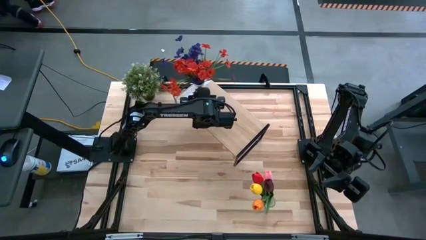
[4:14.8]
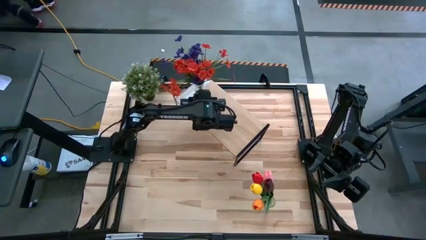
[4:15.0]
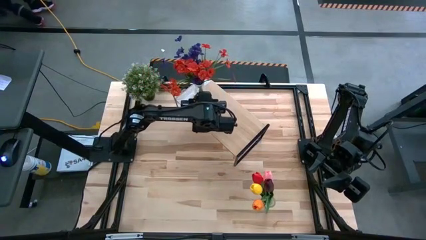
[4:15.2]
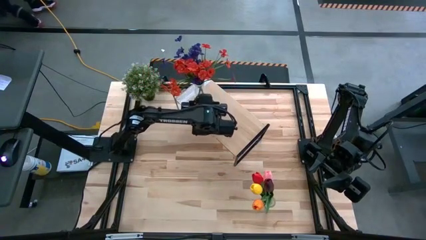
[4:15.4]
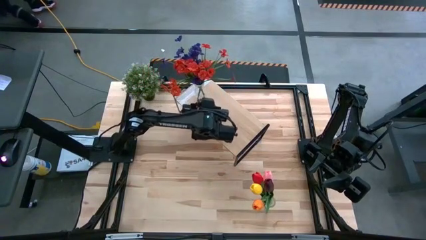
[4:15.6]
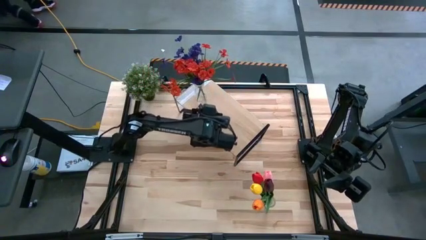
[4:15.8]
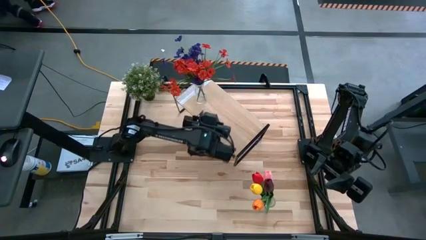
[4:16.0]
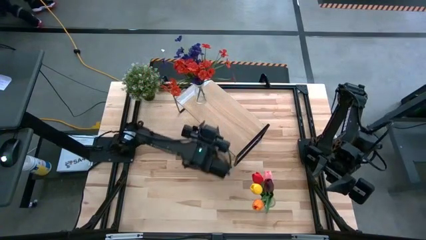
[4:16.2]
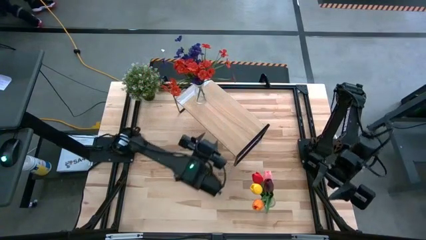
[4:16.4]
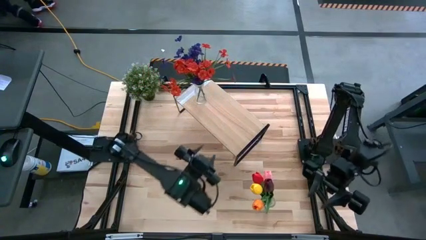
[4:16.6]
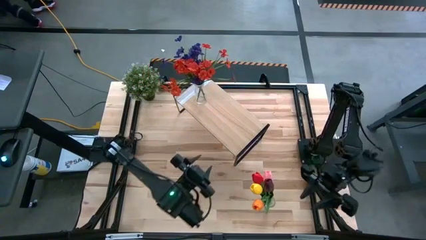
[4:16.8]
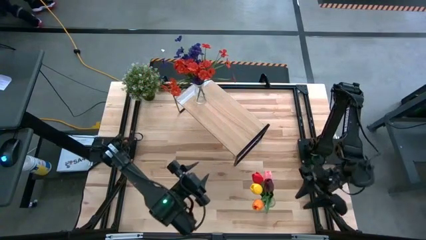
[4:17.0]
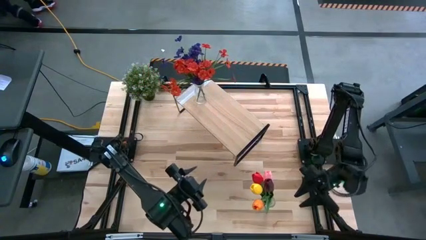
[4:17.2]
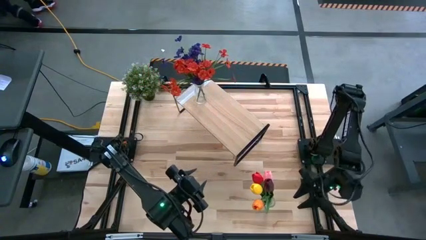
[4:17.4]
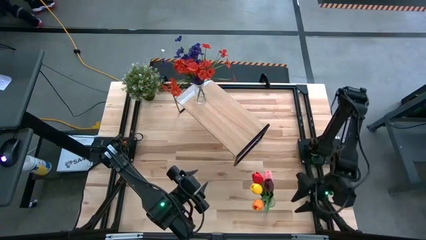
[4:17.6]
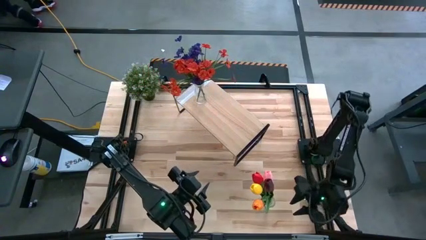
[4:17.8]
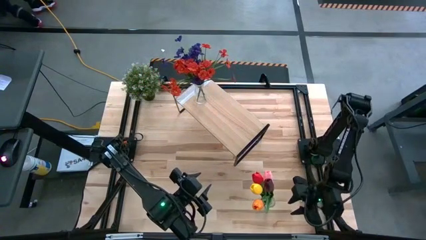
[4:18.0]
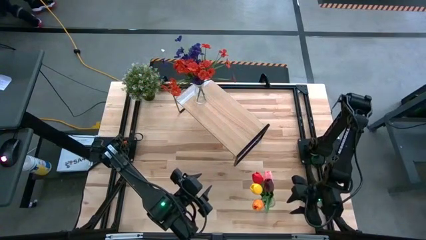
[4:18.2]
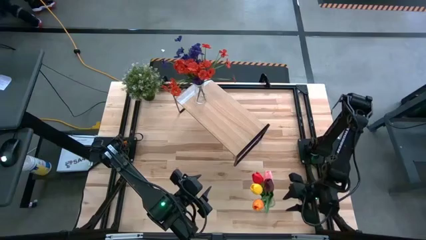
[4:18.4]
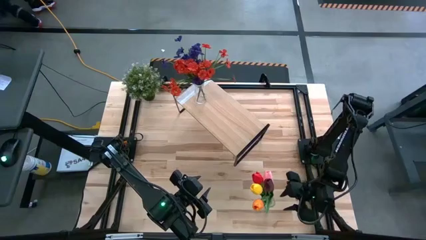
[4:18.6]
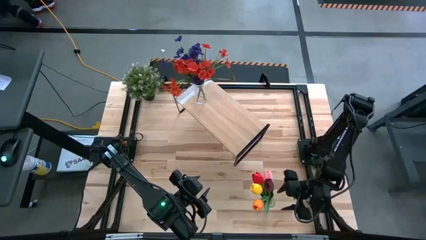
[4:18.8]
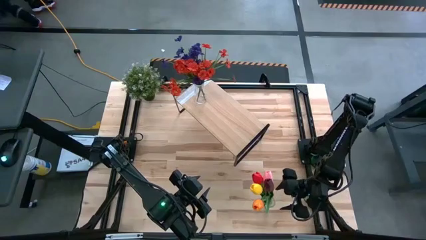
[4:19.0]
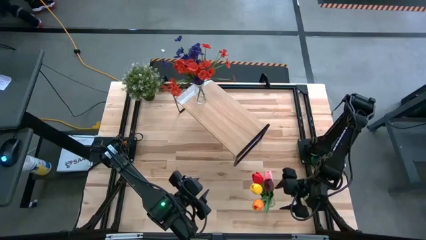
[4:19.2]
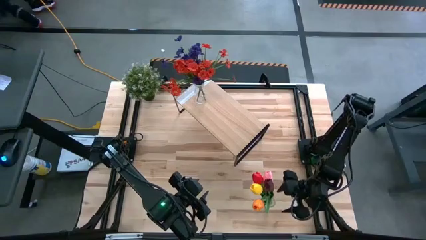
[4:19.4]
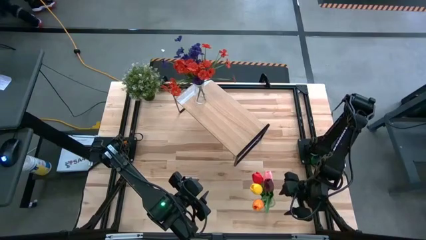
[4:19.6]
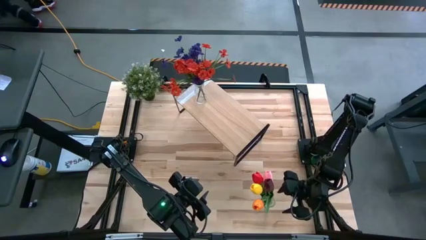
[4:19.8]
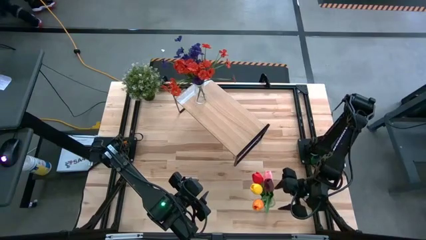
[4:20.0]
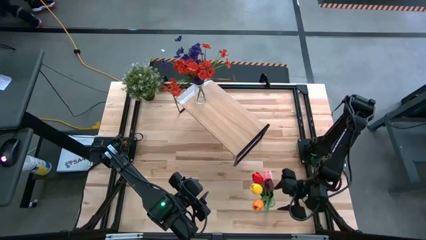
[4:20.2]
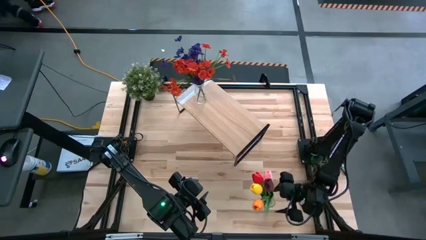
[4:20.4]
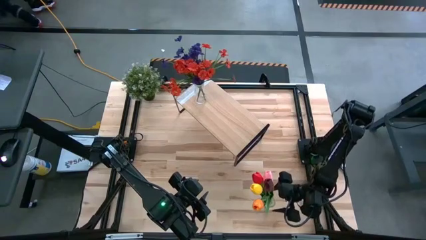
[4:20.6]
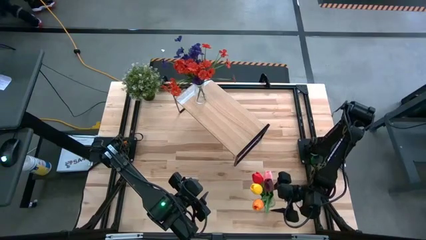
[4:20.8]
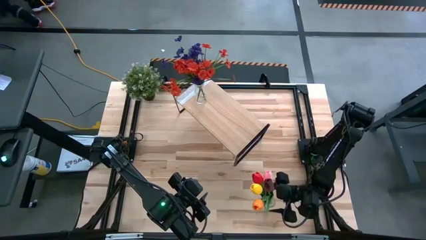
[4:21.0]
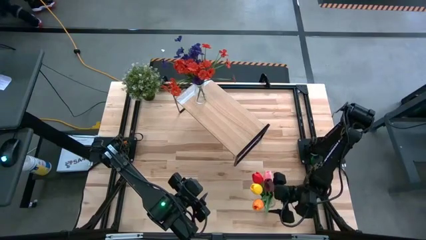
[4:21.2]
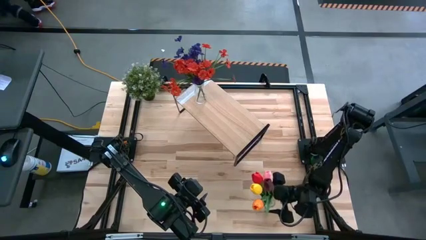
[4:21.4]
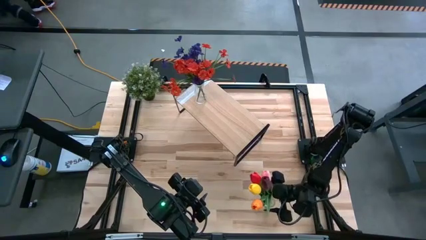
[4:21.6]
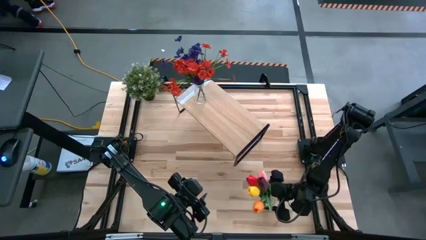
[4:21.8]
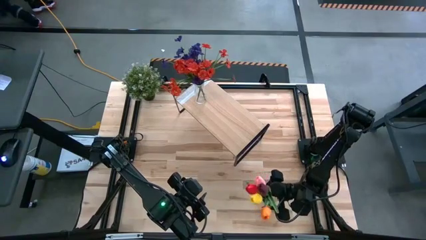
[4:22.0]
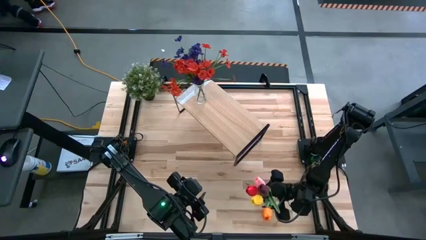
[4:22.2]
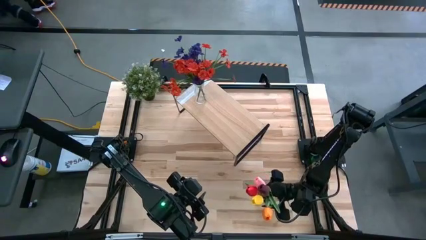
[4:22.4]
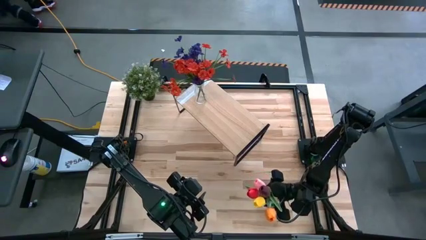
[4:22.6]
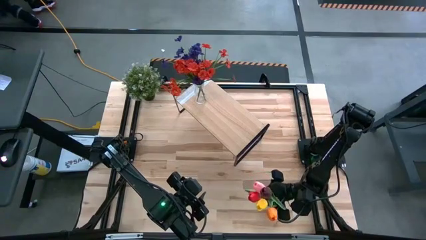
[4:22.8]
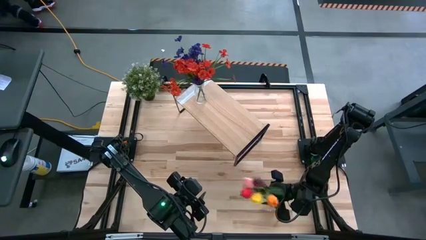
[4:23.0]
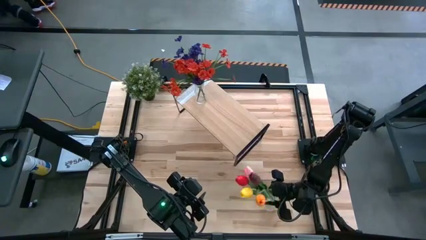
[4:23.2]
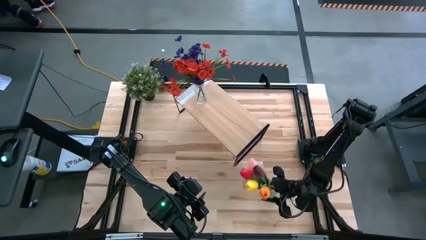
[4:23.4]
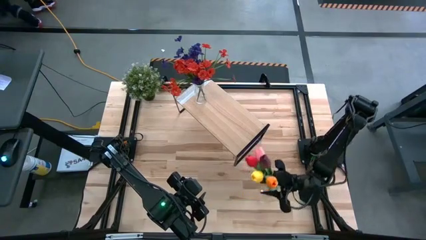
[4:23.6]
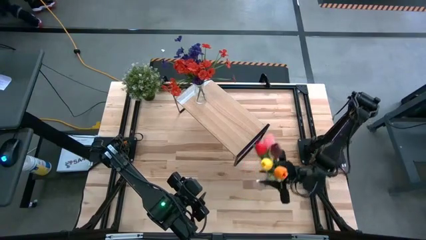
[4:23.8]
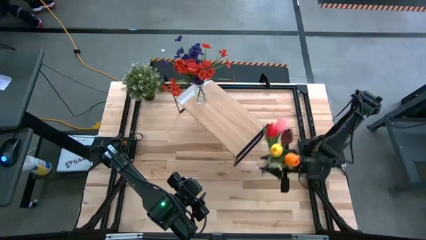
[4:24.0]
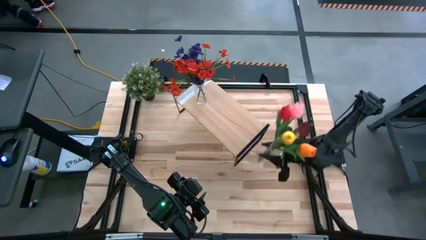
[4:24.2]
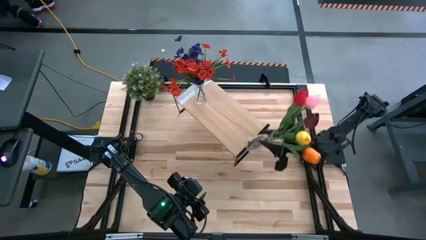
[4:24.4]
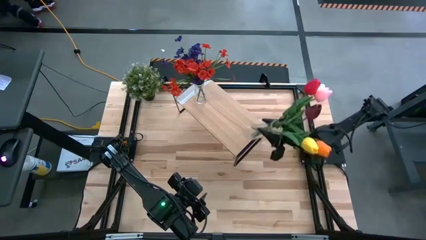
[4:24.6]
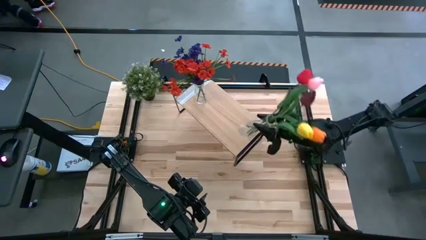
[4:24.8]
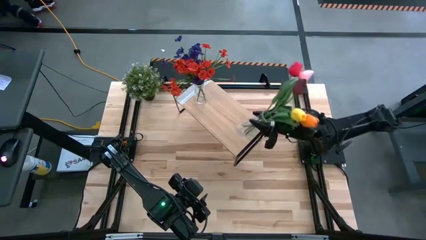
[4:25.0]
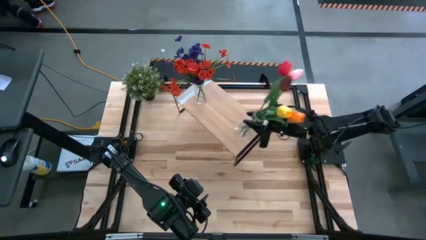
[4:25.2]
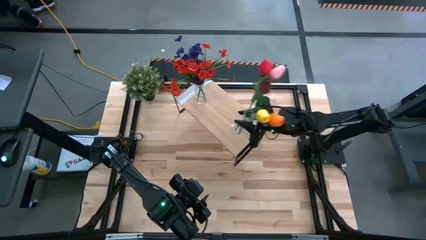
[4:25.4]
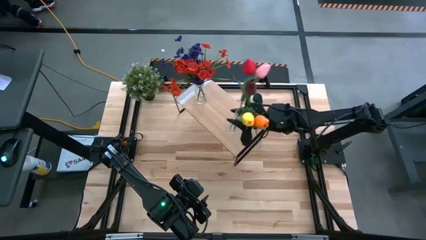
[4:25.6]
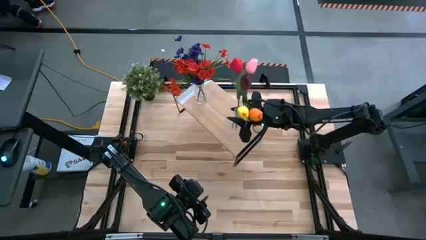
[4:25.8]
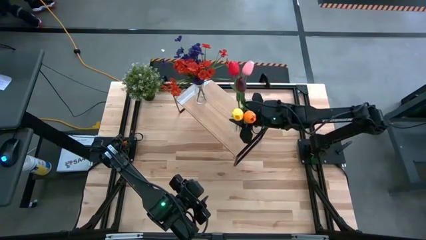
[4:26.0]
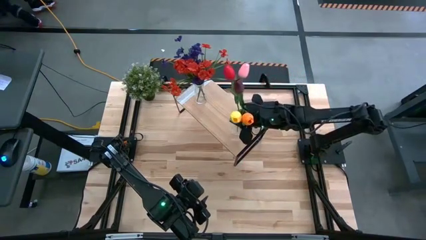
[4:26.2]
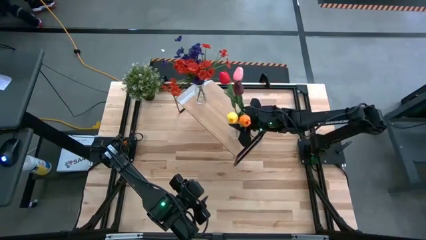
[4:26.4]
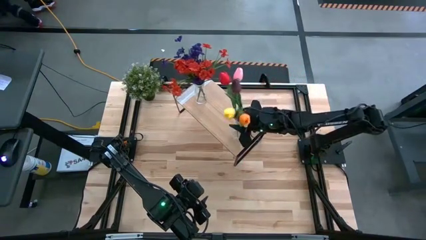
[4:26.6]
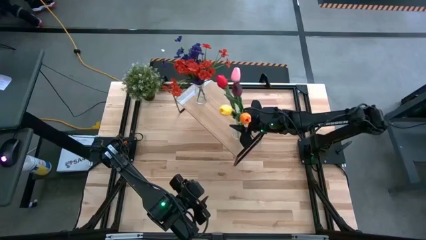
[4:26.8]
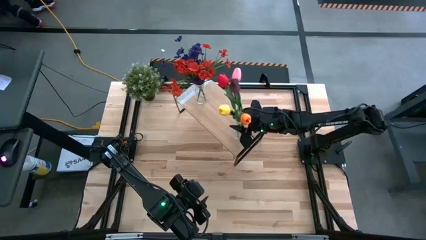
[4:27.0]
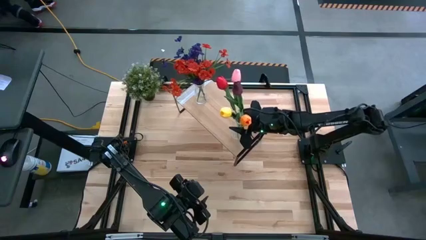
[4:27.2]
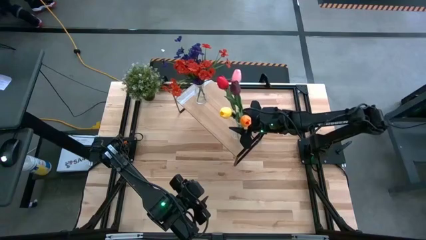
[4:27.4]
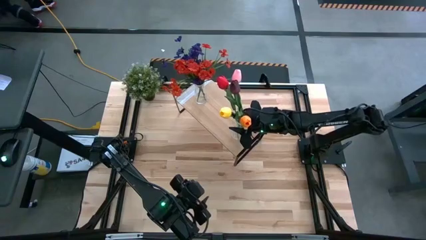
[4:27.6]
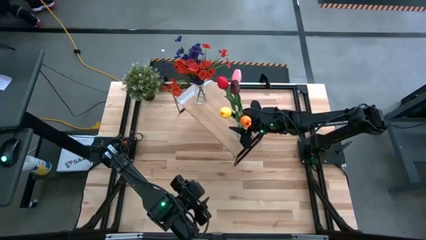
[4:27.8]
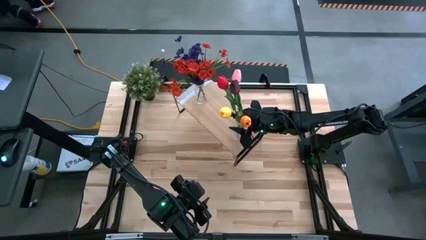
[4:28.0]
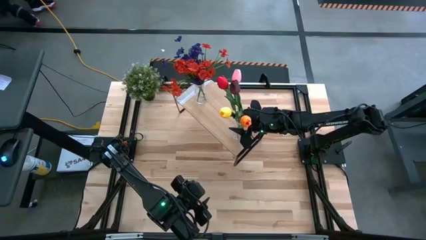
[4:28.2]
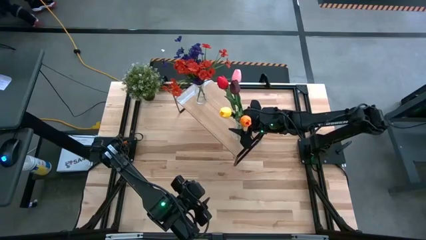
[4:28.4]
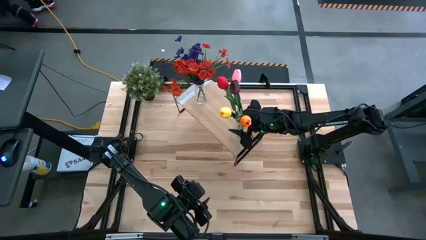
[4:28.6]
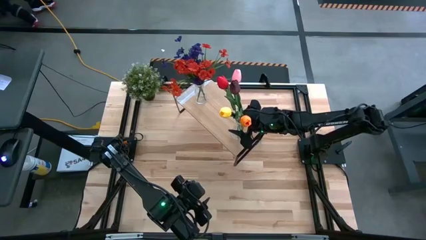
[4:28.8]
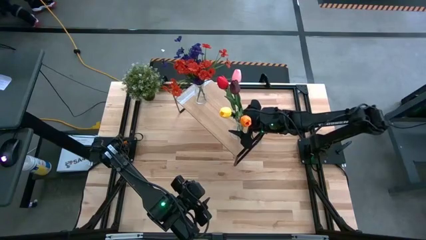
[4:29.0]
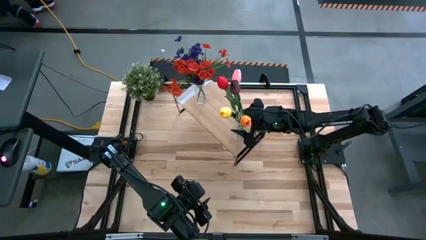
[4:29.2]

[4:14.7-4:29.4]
Task: Pick and place flowers into a vace then onto a shelf
Put the transparent vase on the shelf
